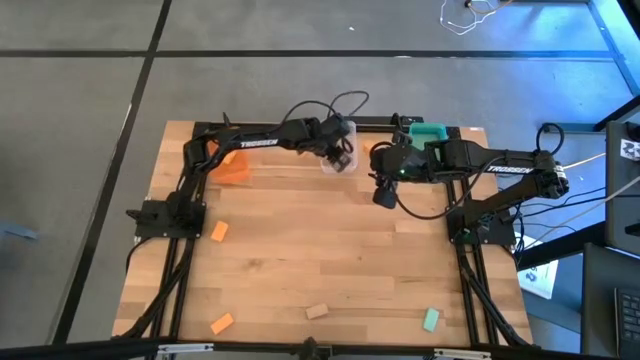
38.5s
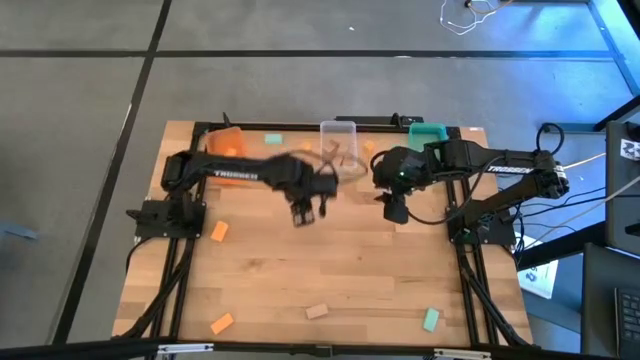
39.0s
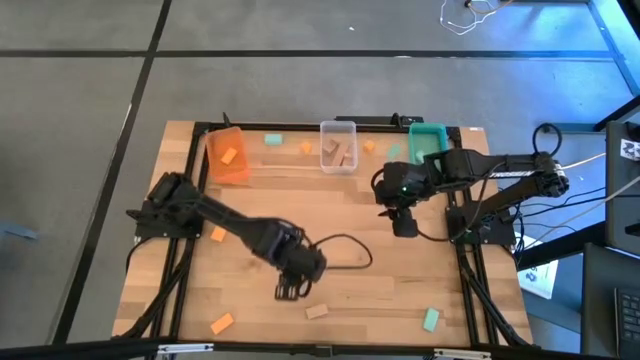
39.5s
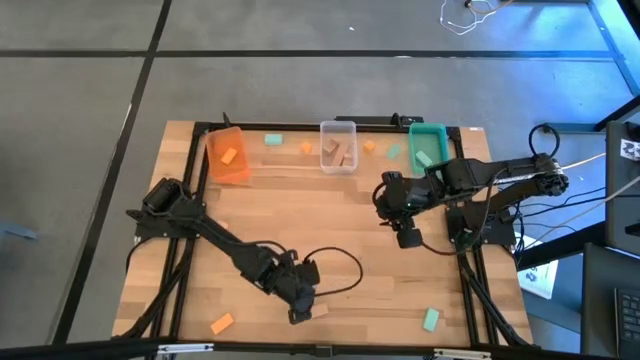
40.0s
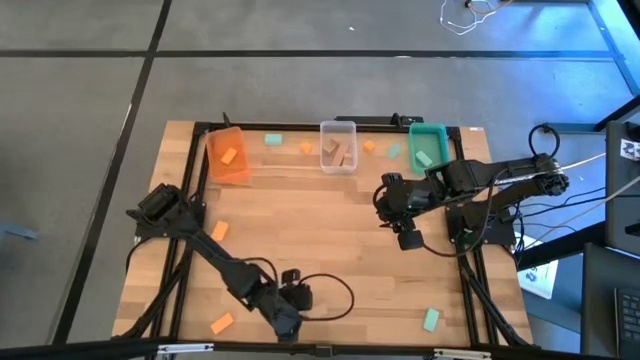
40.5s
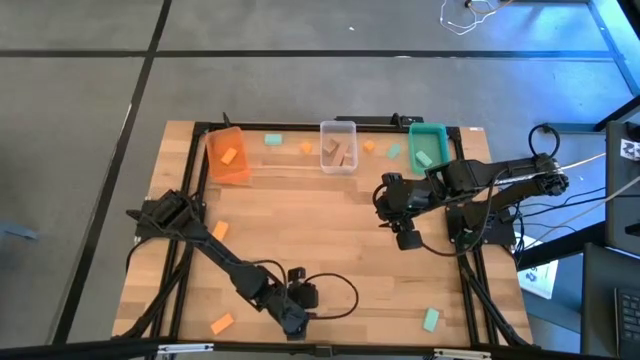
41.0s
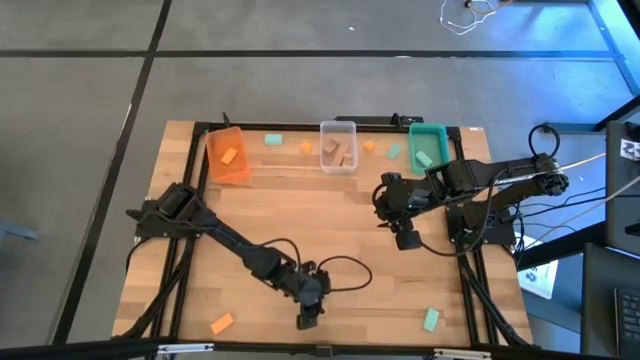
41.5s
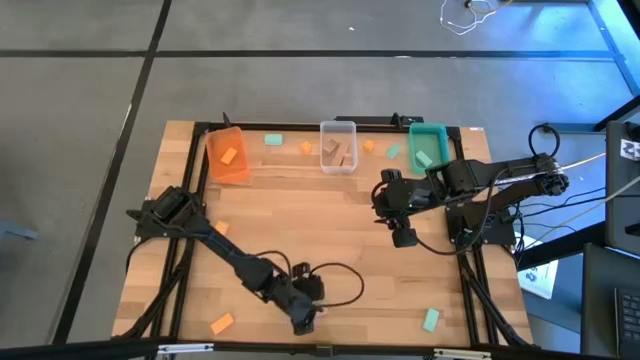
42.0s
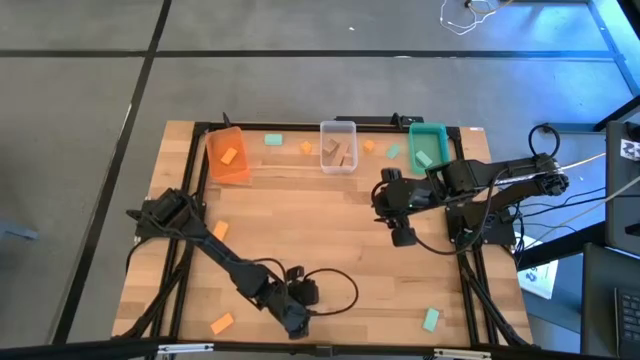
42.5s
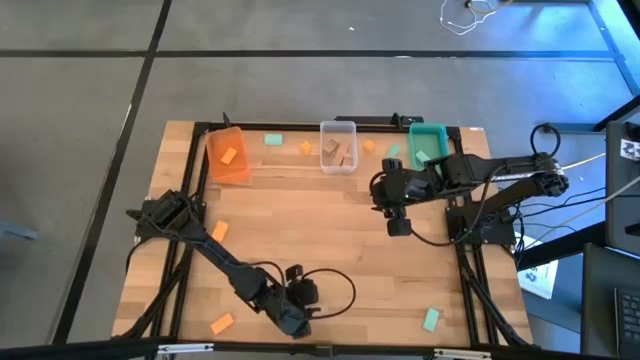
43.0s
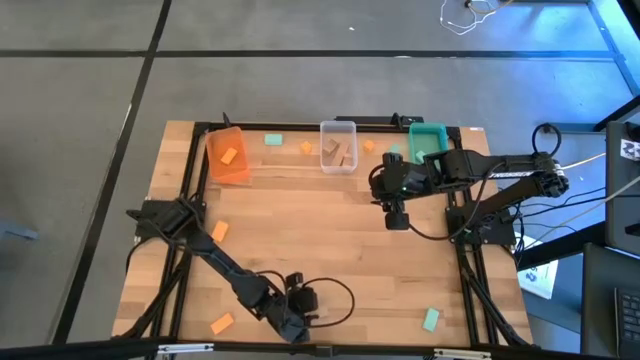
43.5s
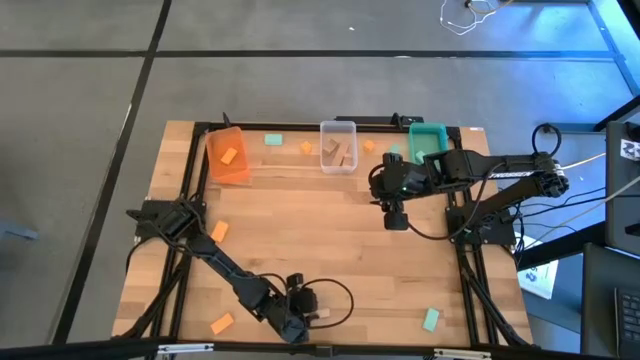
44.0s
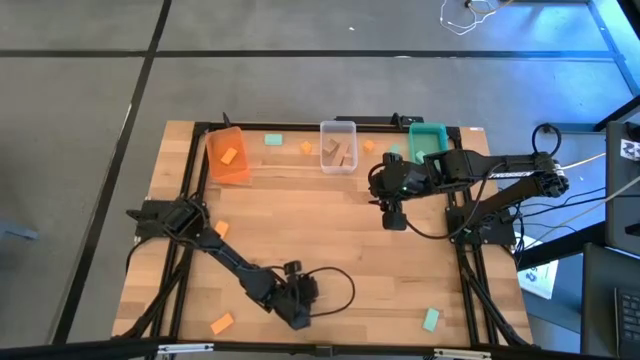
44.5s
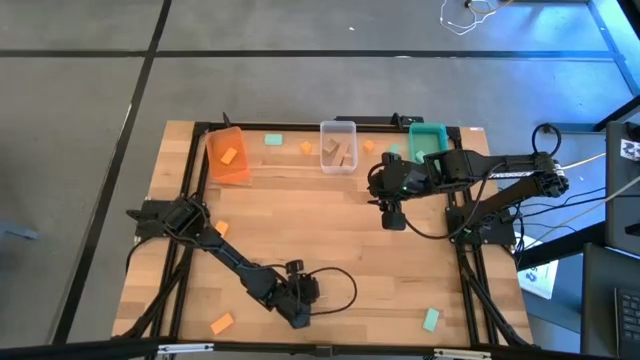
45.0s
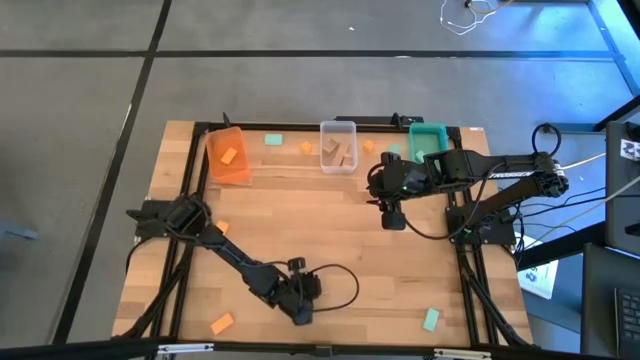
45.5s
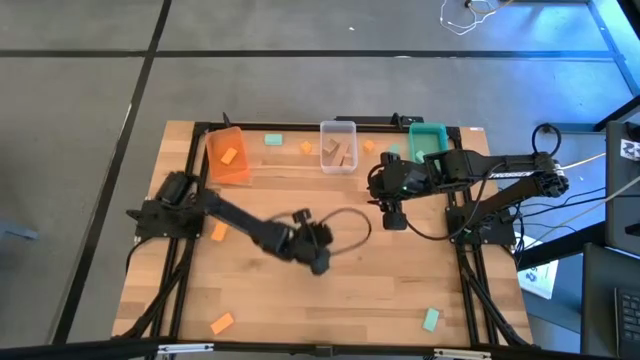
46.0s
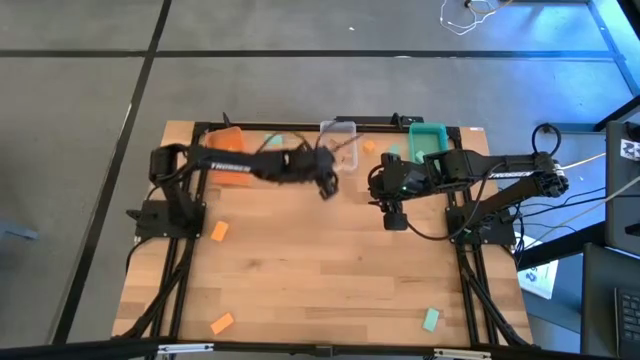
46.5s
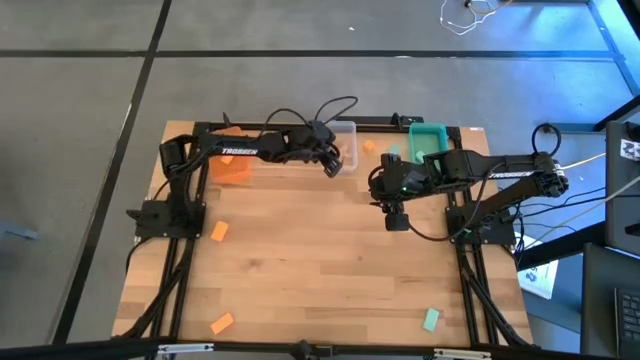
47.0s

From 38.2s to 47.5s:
Task: Sort & place blocks by color
Put the brown block into the transparent bin

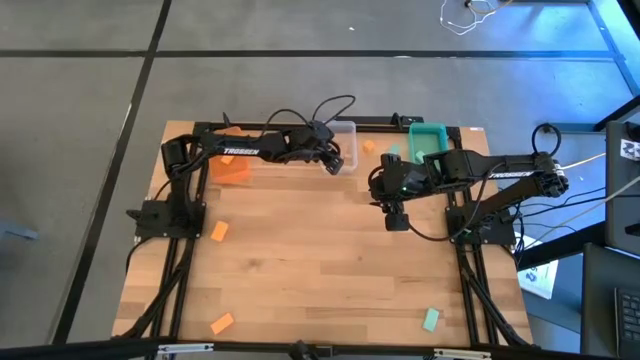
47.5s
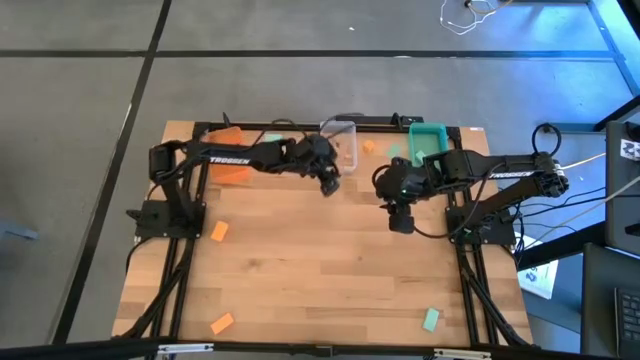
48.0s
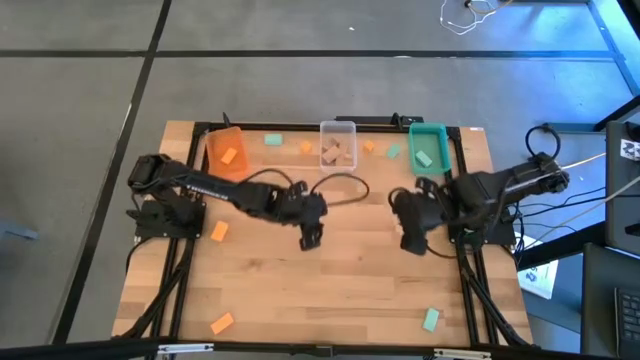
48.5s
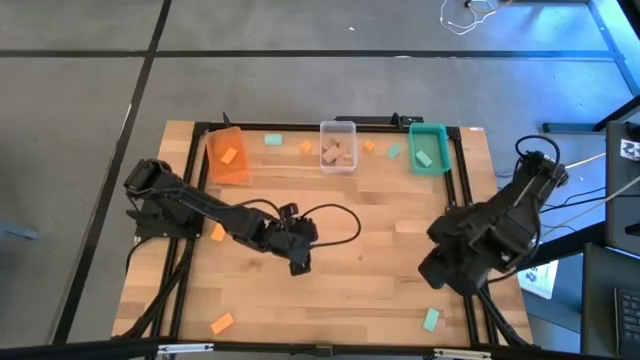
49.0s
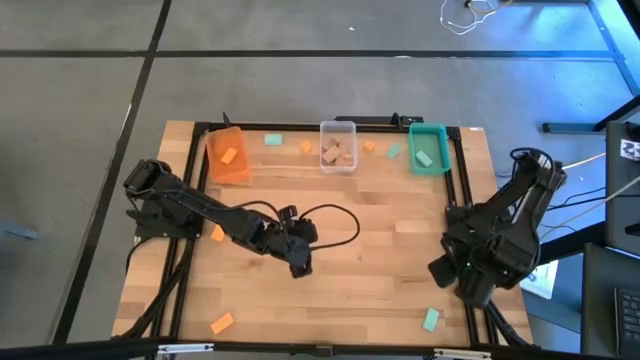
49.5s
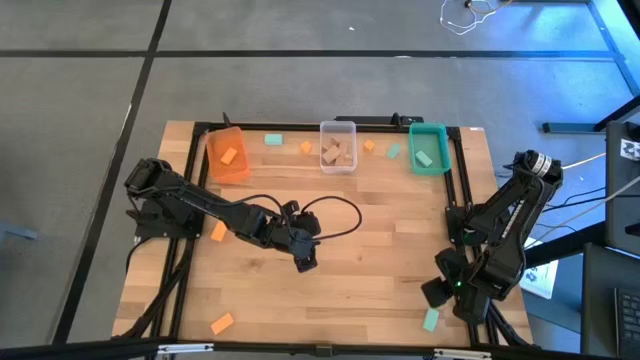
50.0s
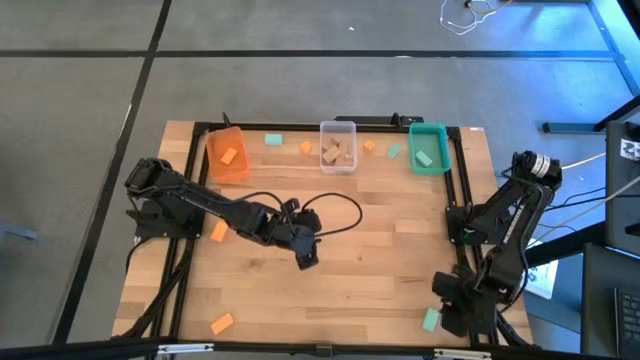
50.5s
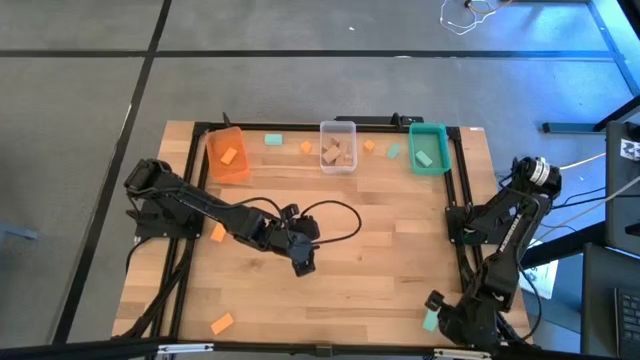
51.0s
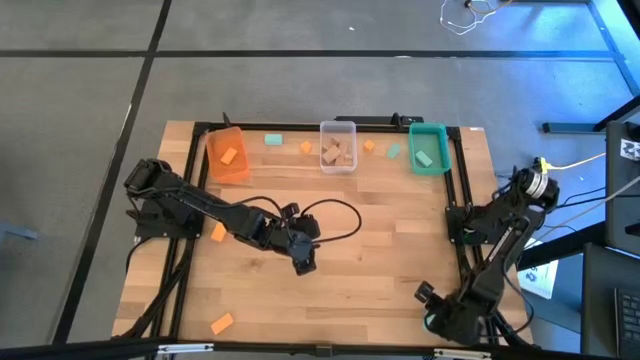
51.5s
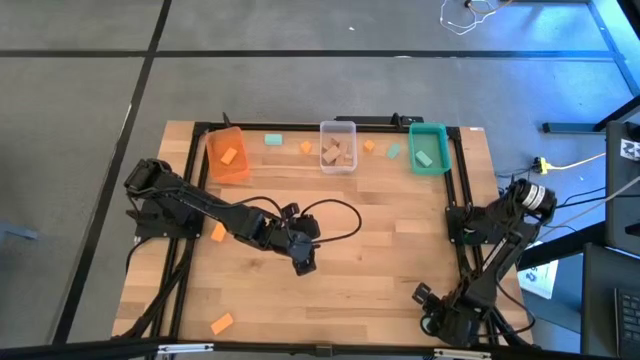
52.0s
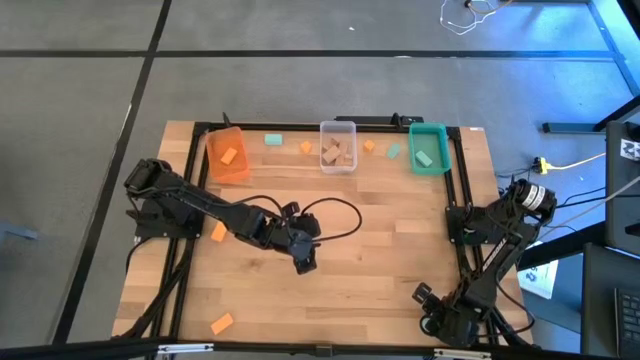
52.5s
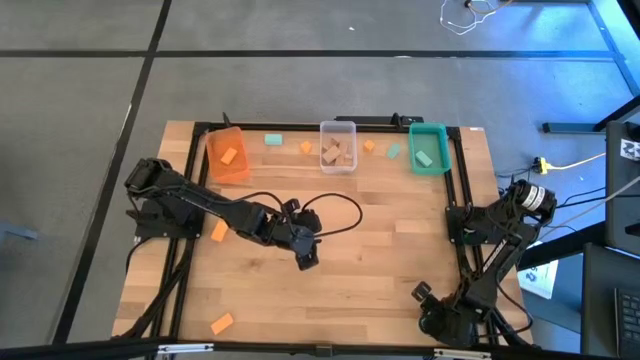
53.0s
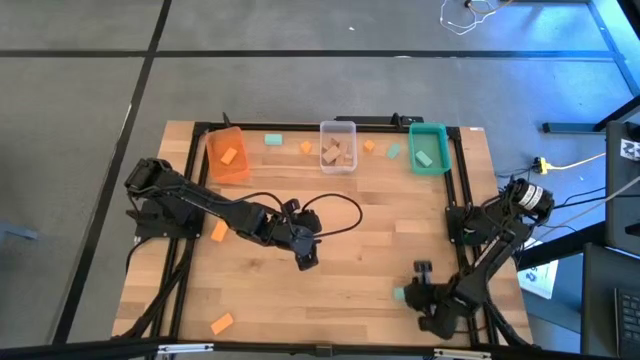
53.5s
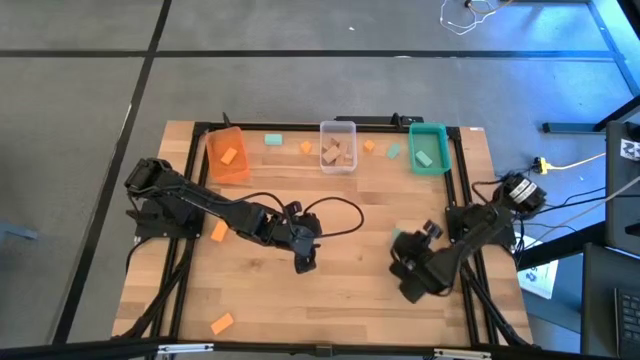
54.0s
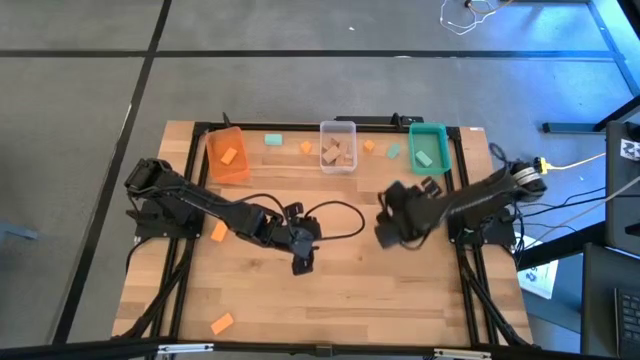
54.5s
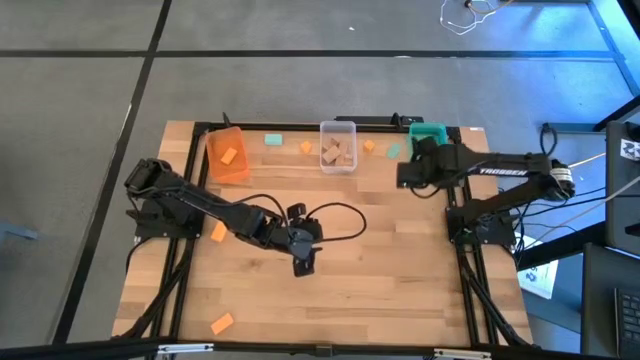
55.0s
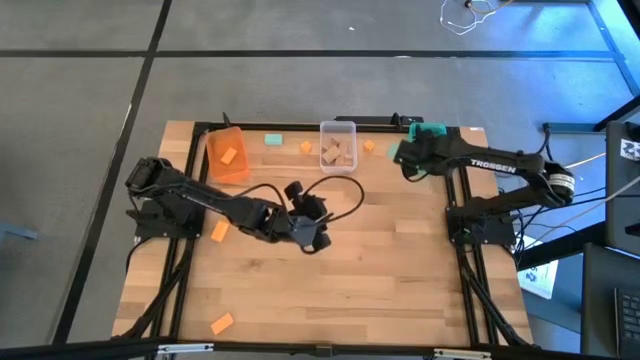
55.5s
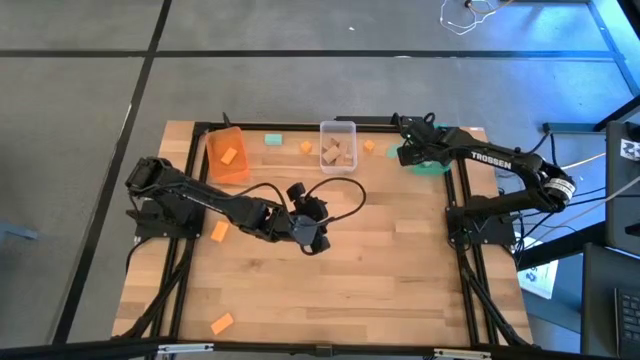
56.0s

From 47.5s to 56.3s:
Put the green block into the green bin

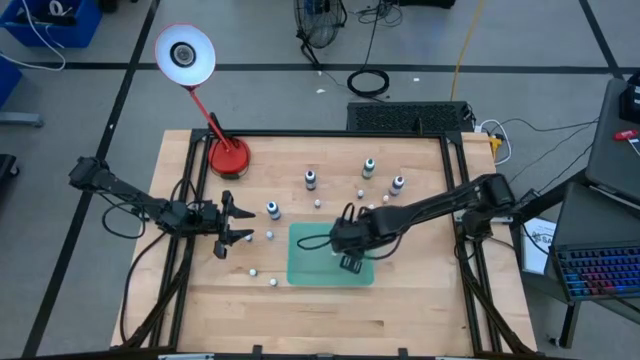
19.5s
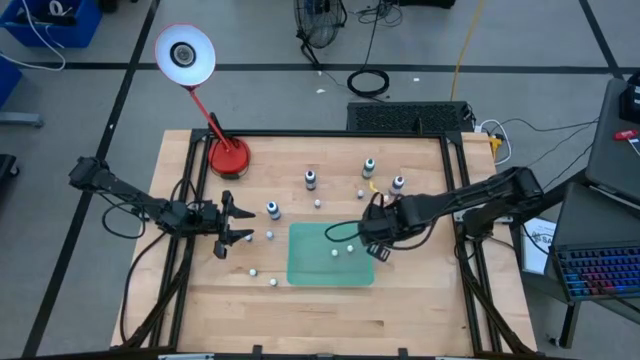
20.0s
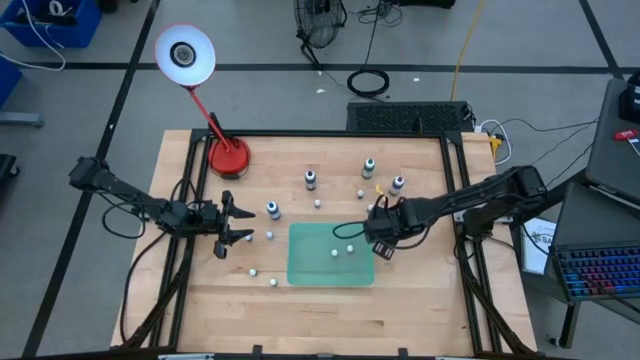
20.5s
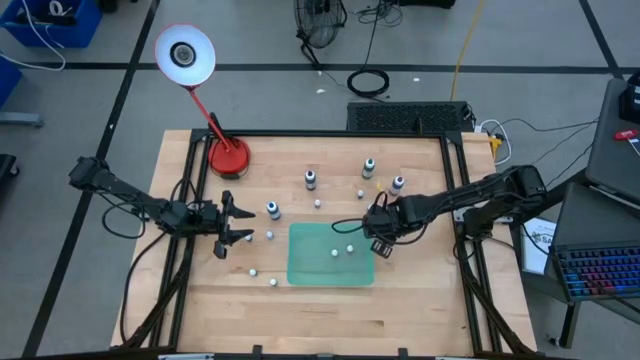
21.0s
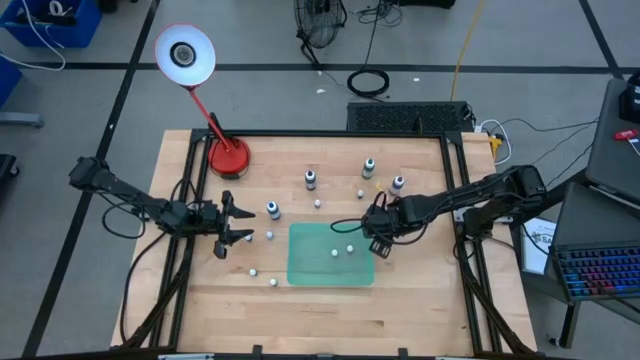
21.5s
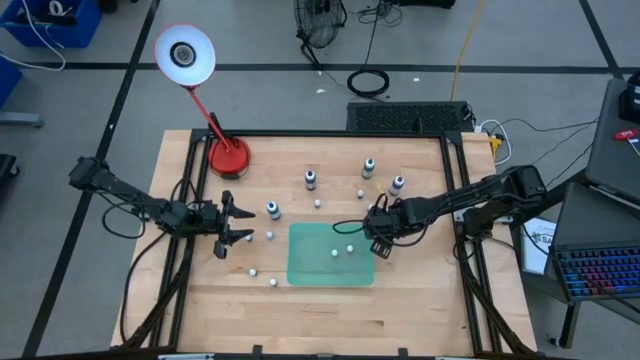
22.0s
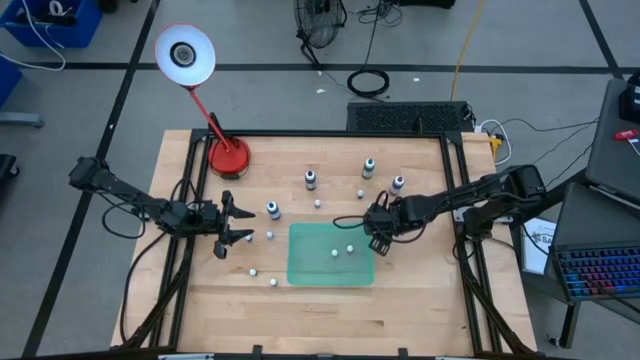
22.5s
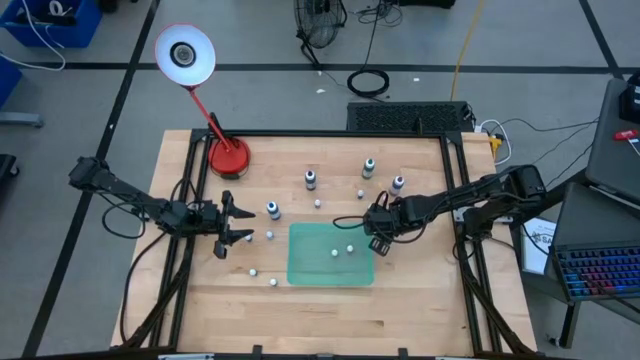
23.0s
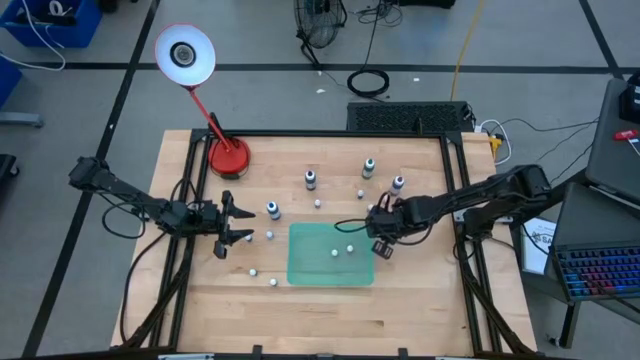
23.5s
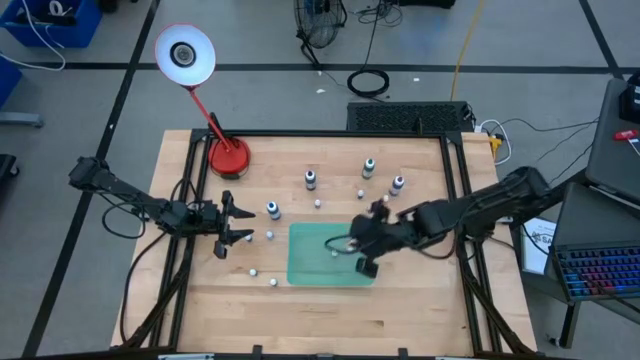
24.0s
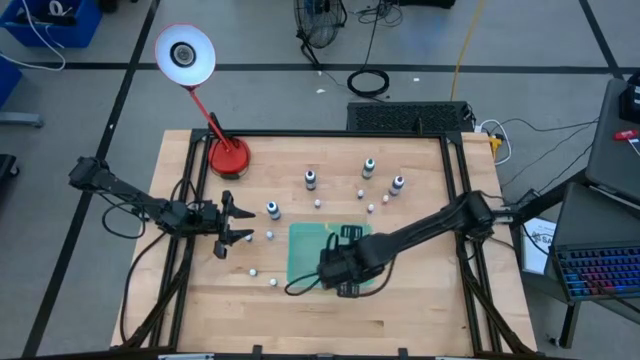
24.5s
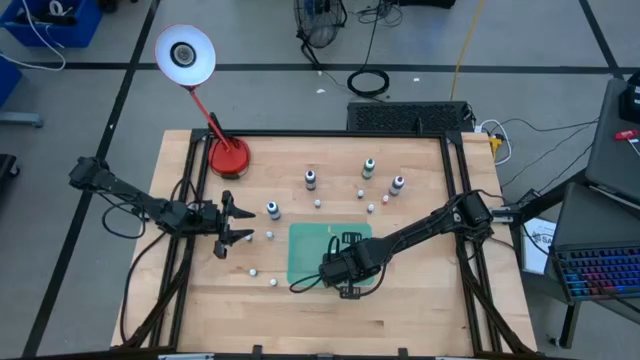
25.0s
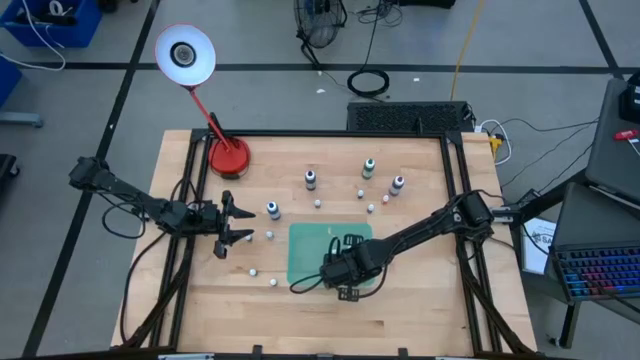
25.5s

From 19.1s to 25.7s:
Task: Pick & Place food coloring
Put the small yellow food coloring bottle into the green bin
